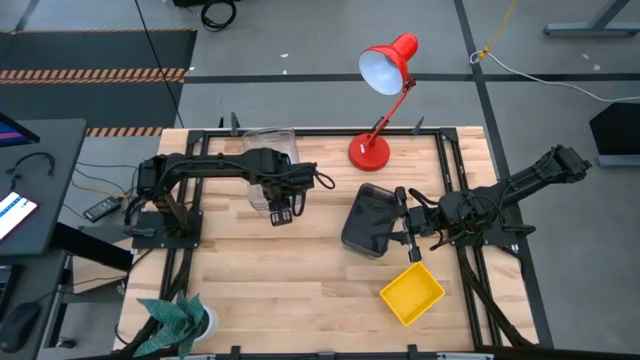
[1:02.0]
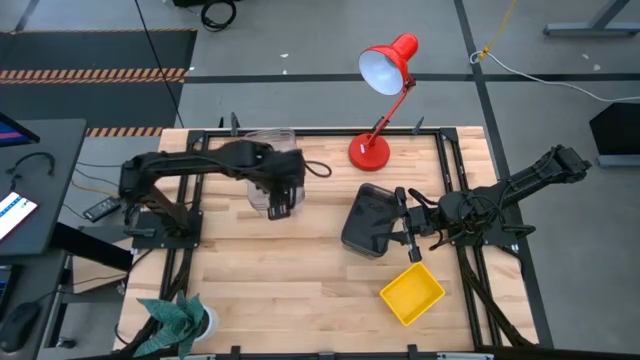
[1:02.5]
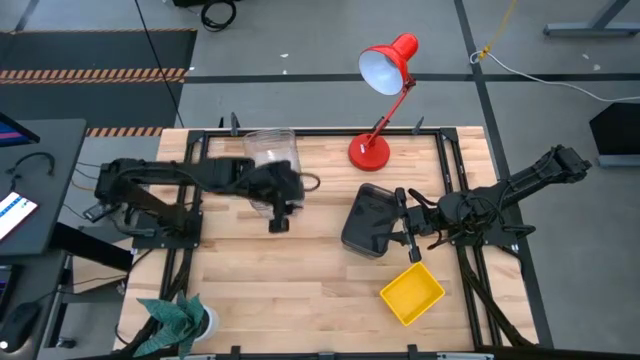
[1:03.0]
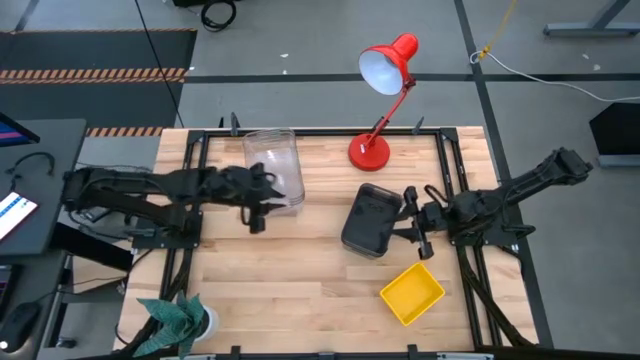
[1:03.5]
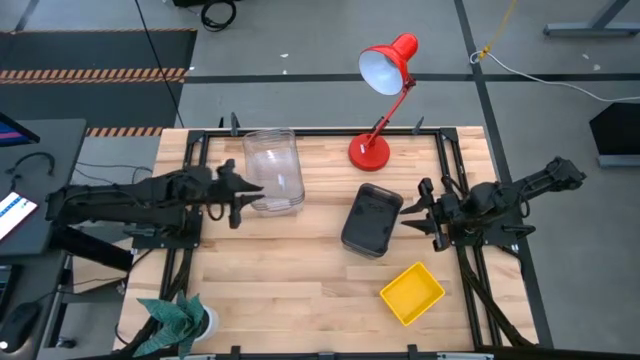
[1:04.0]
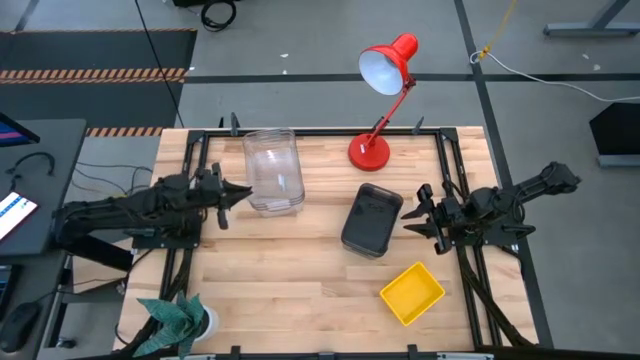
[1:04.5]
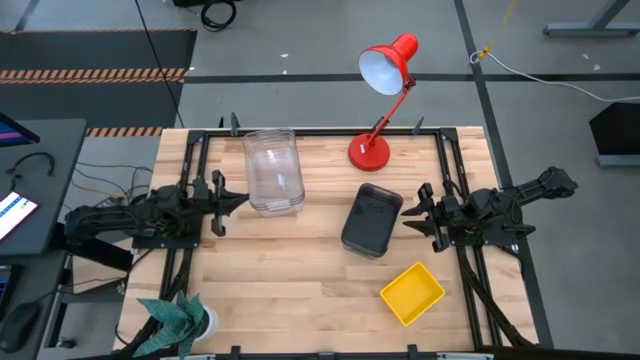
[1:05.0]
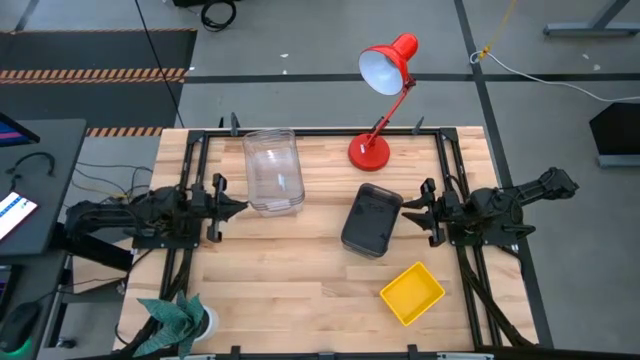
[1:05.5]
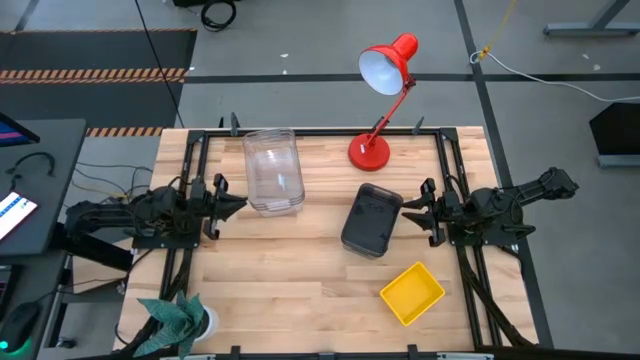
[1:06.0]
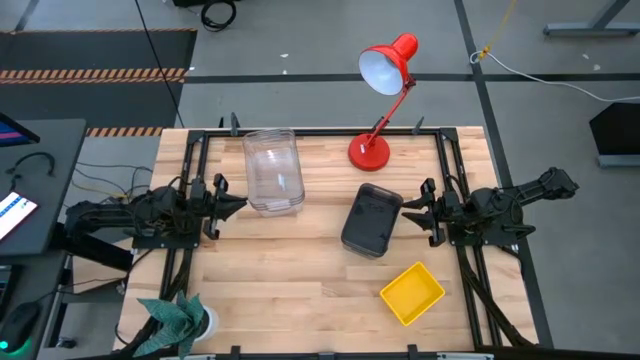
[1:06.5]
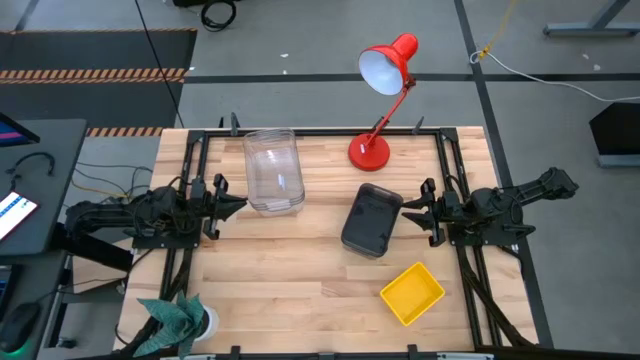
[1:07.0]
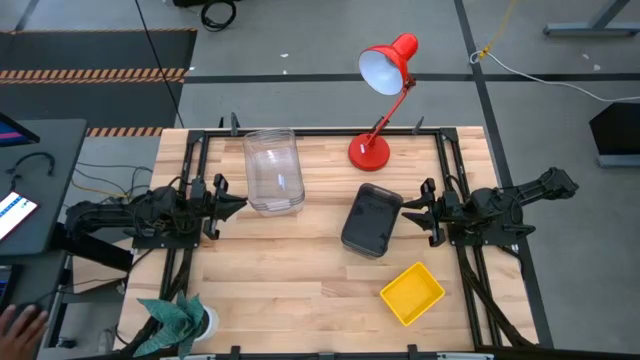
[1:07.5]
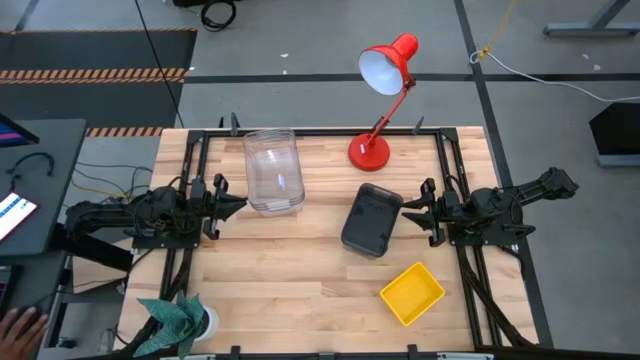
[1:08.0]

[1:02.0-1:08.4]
Return to Home Position

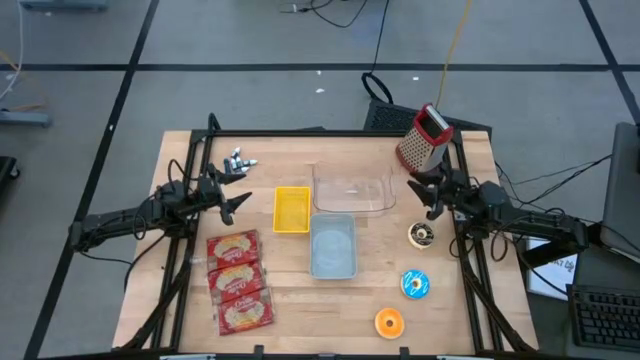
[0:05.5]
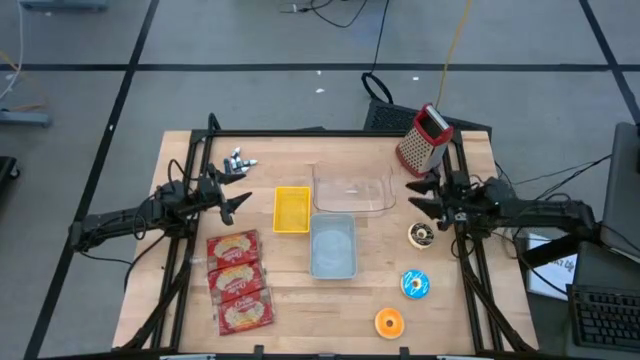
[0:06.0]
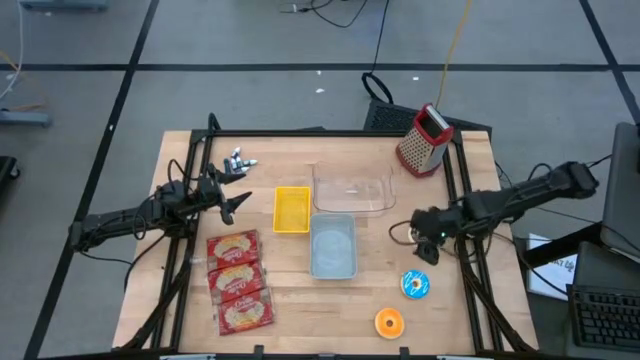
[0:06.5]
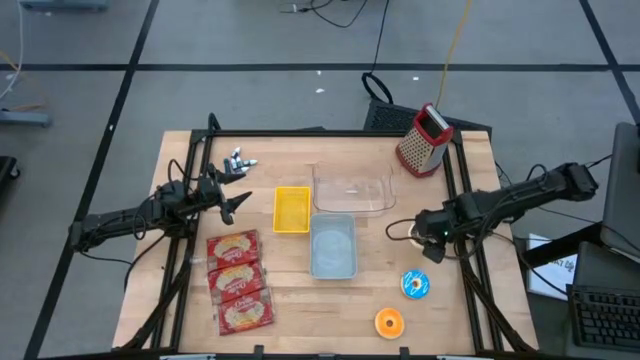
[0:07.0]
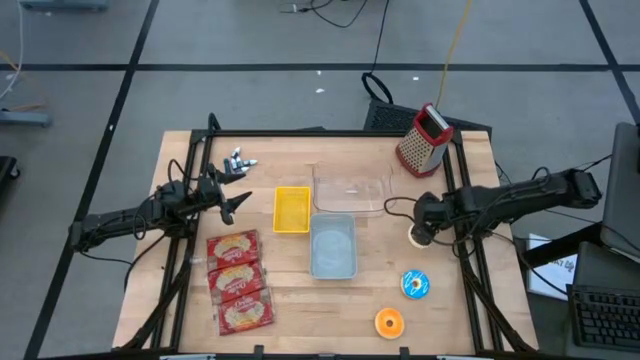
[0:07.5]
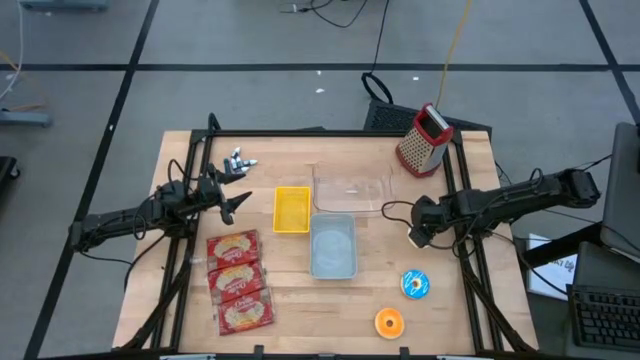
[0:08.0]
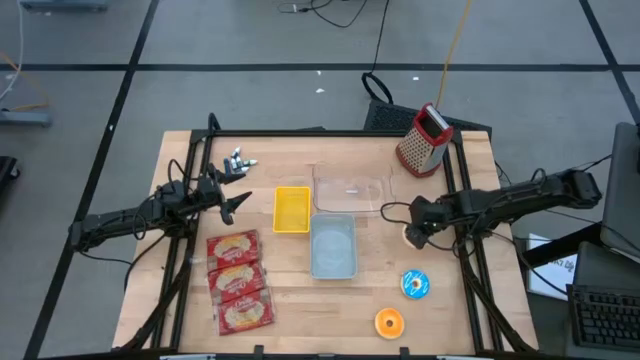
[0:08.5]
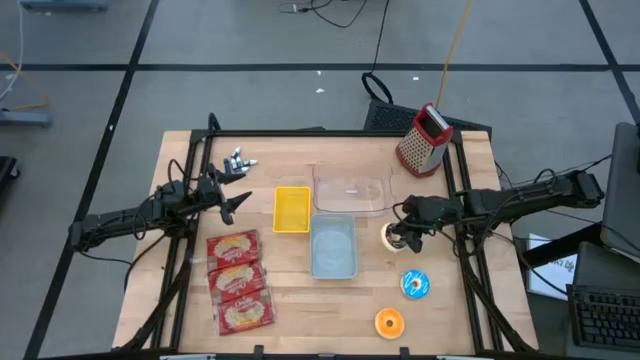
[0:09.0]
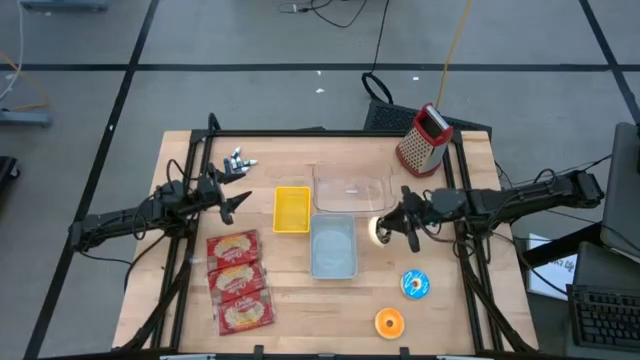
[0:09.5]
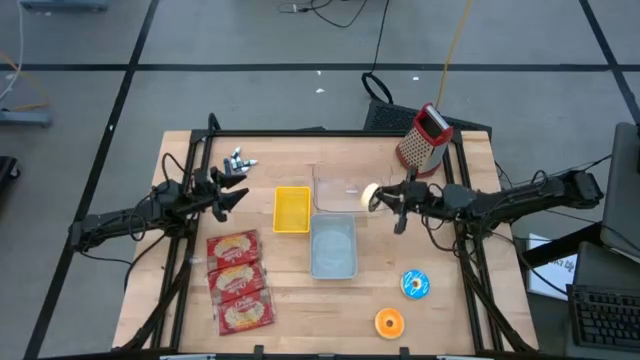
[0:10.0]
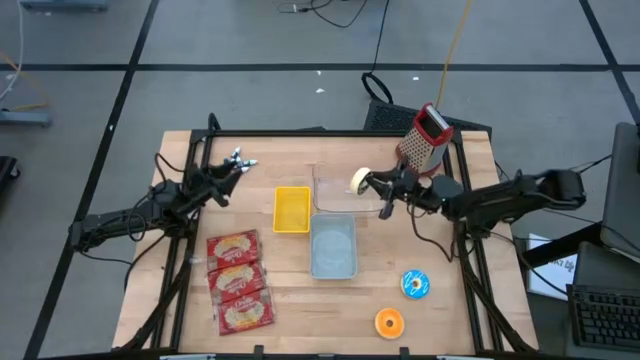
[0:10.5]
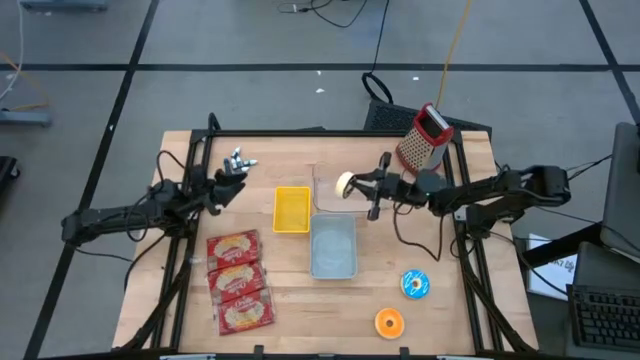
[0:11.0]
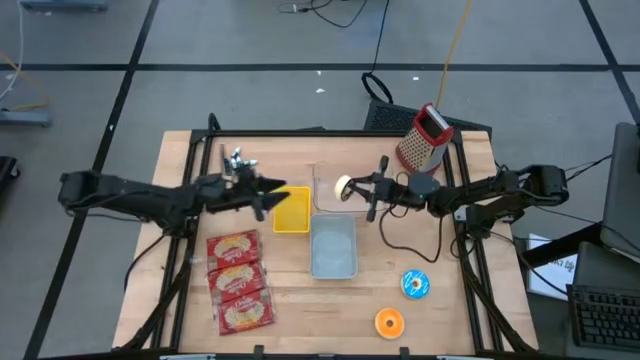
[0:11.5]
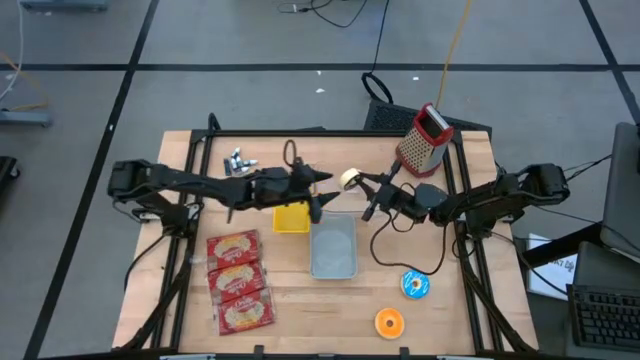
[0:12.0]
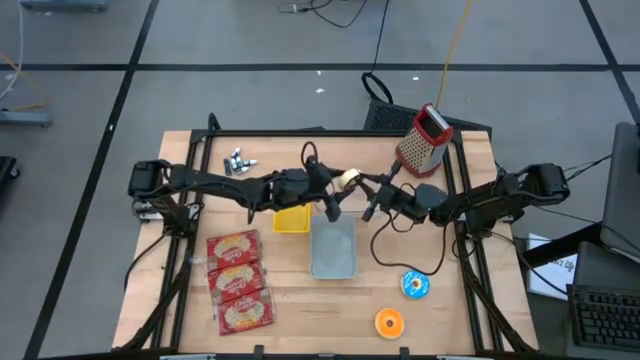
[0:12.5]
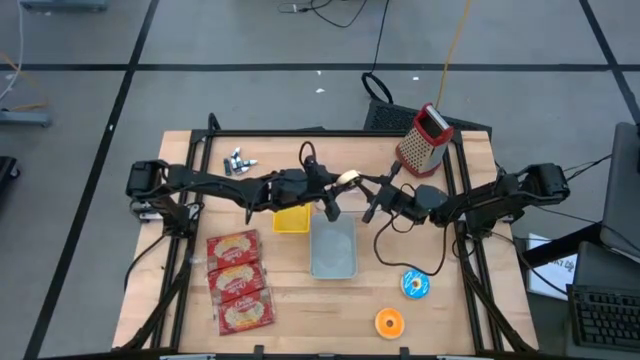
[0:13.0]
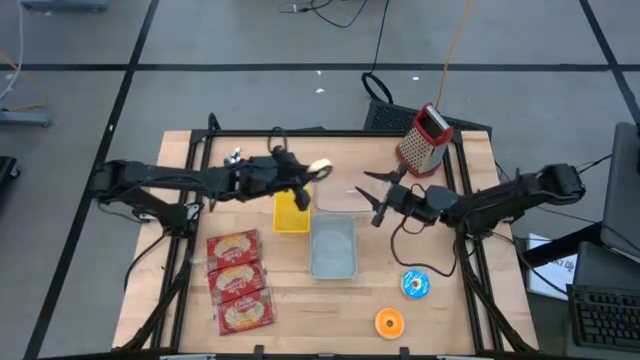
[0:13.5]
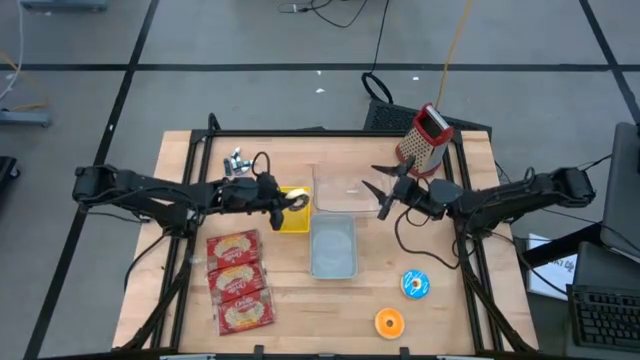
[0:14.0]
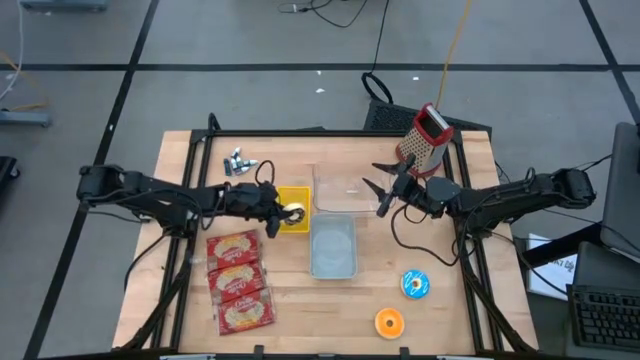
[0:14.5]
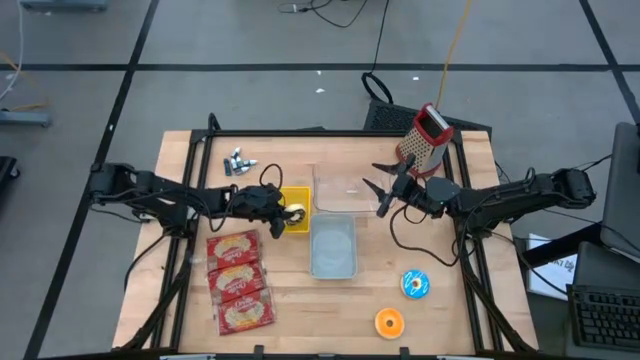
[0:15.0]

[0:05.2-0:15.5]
Put the black doughnut into the yellow bin
